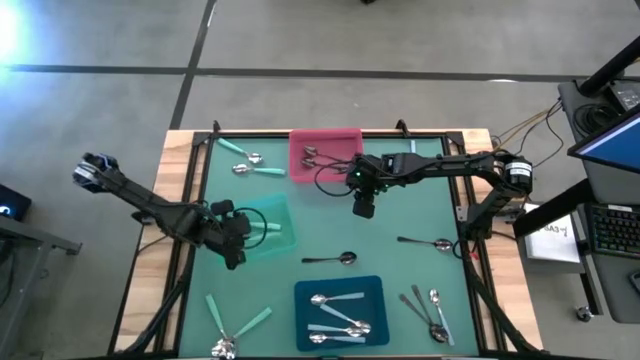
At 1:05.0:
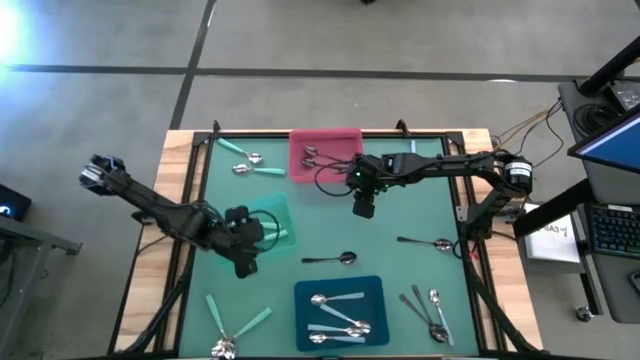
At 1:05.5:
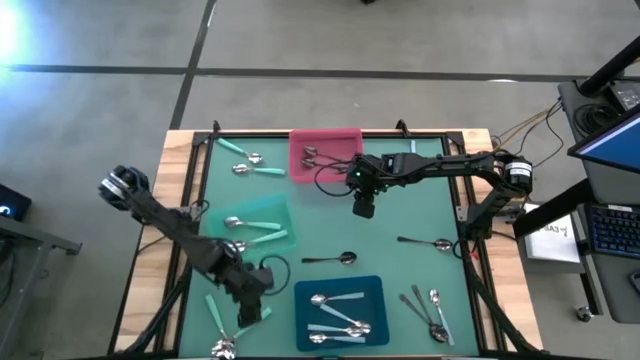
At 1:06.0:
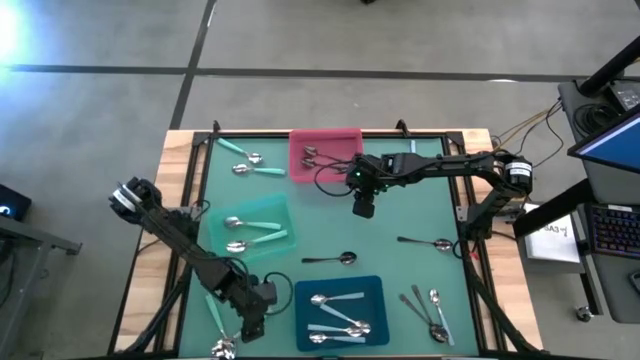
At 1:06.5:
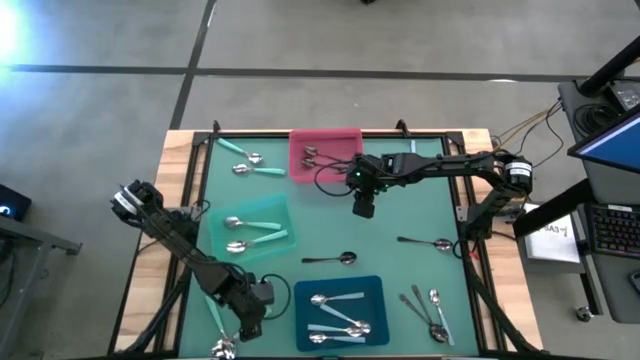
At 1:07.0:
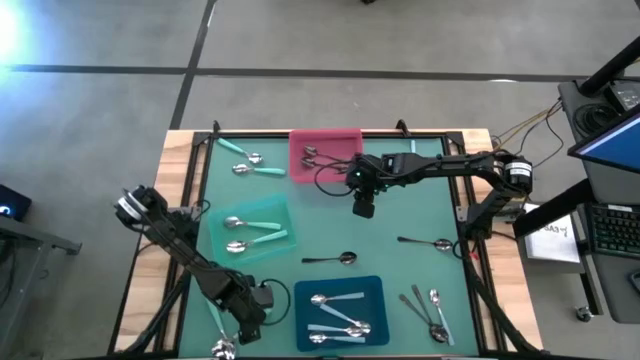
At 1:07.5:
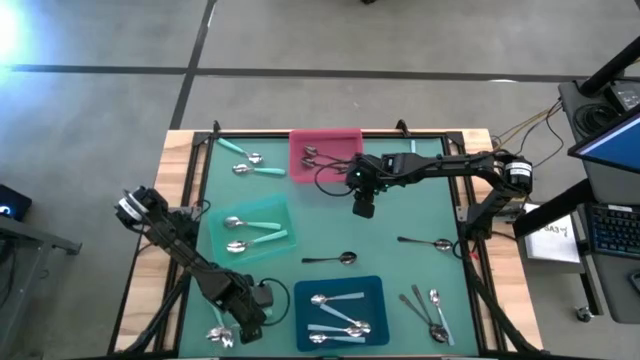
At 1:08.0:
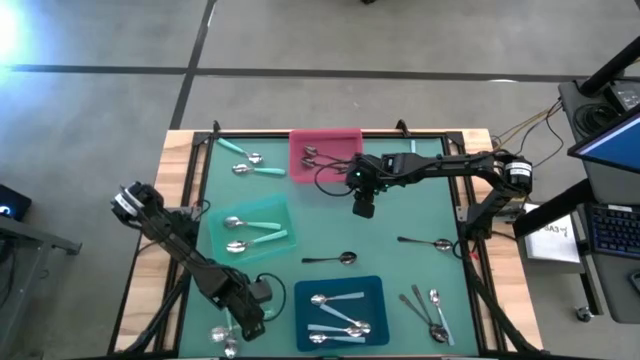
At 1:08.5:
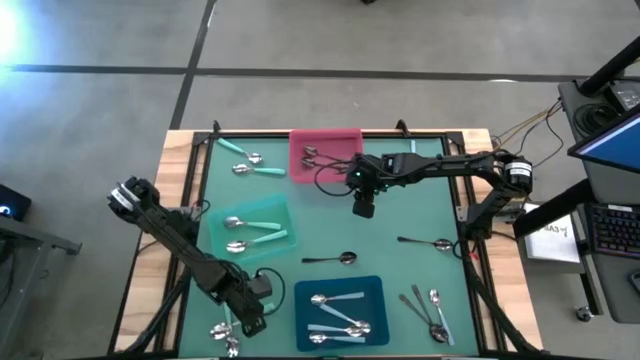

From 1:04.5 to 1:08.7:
Task: Sort silverware by color (type)
Put the green spoon into the green bin

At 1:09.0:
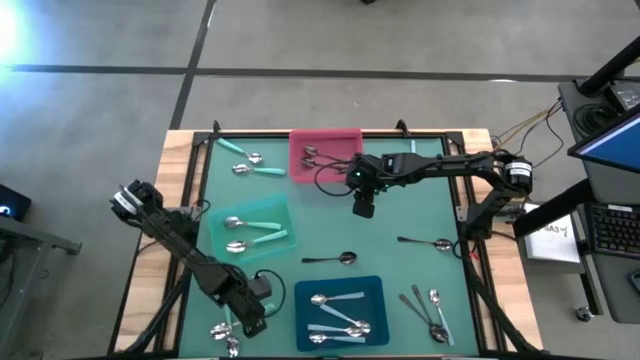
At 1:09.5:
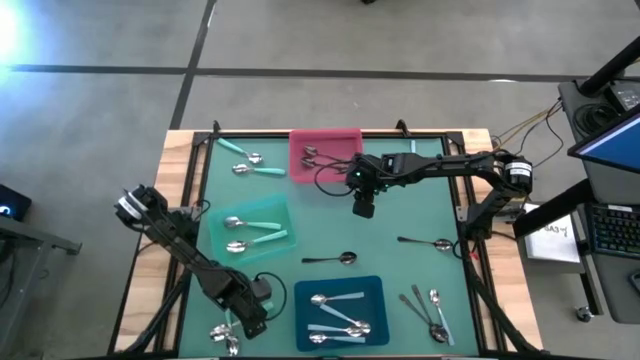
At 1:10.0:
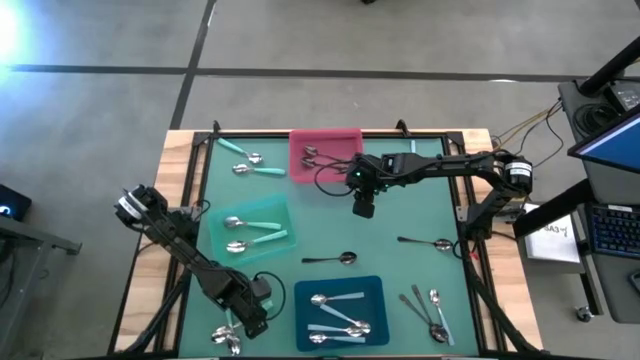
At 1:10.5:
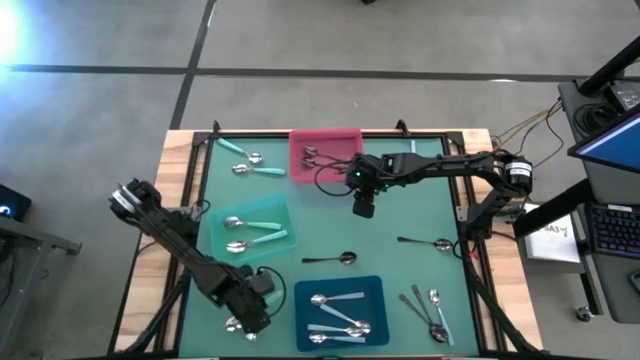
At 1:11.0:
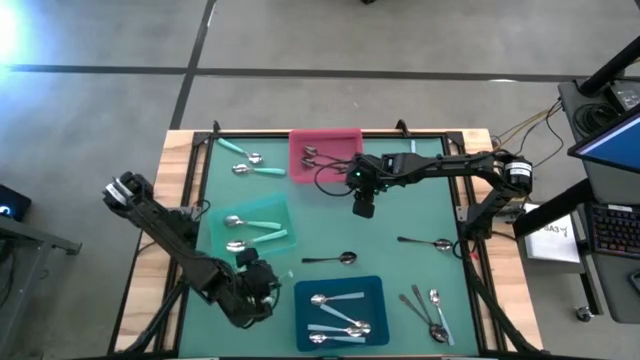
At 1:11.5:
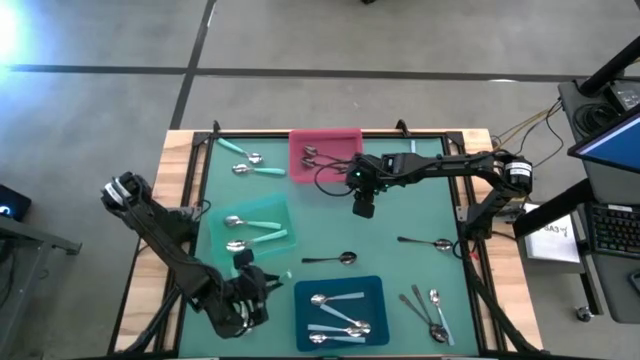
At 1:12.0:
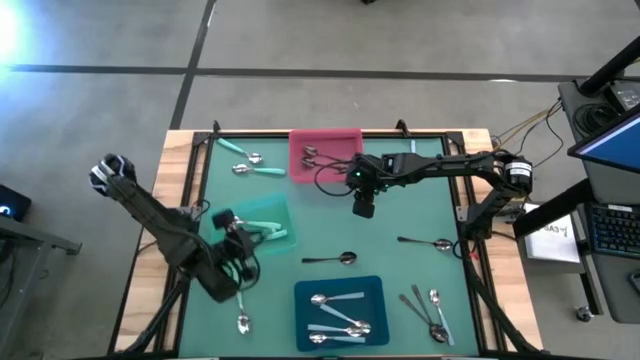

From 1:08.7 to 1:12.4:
Put the green spoon into the green bin

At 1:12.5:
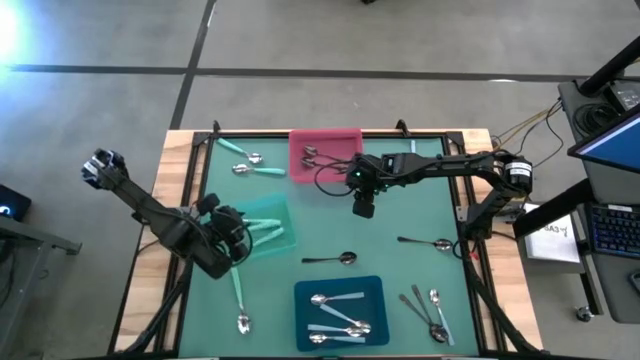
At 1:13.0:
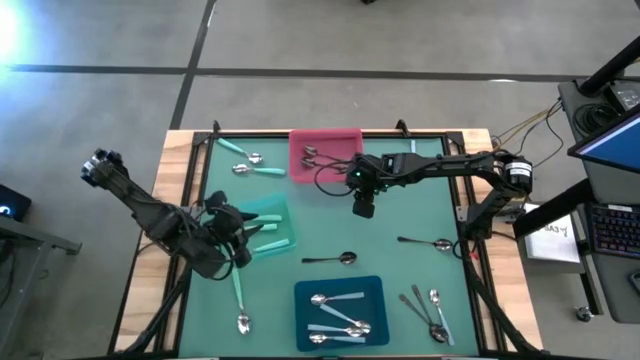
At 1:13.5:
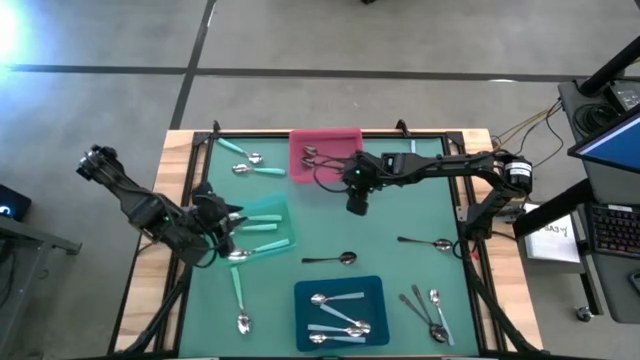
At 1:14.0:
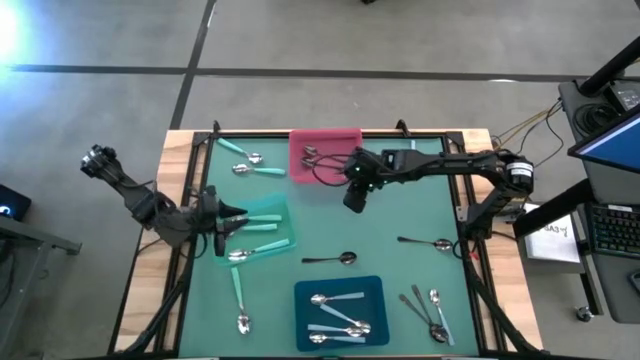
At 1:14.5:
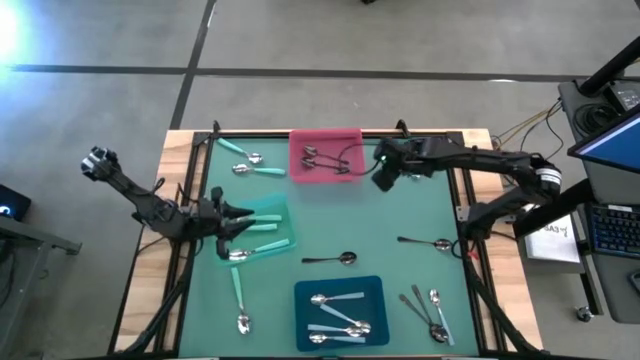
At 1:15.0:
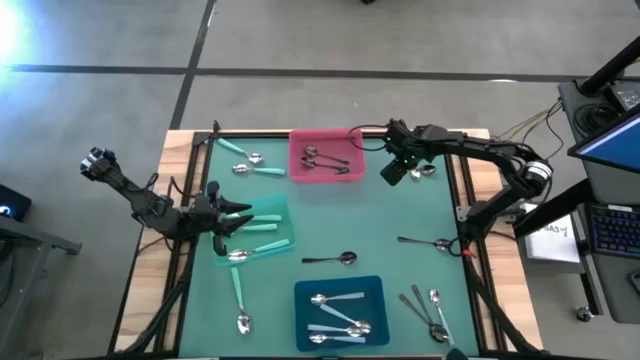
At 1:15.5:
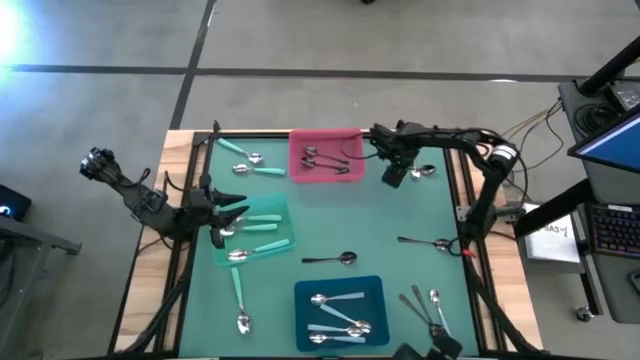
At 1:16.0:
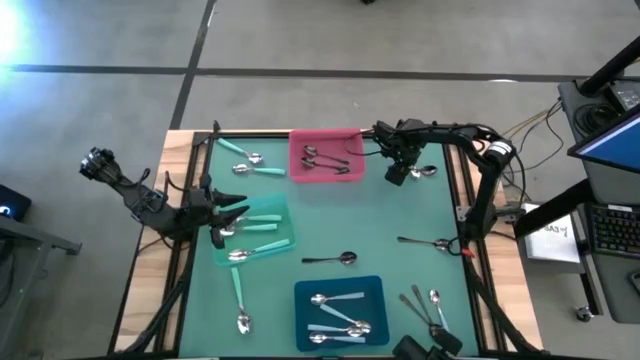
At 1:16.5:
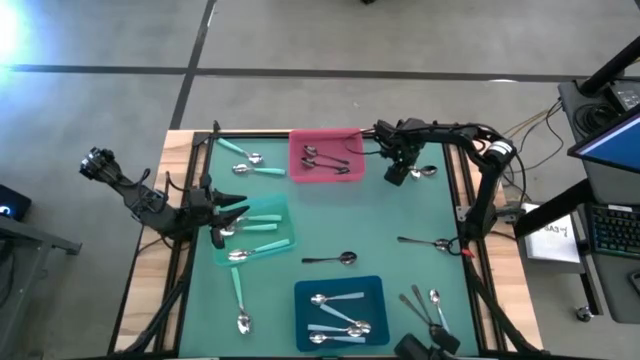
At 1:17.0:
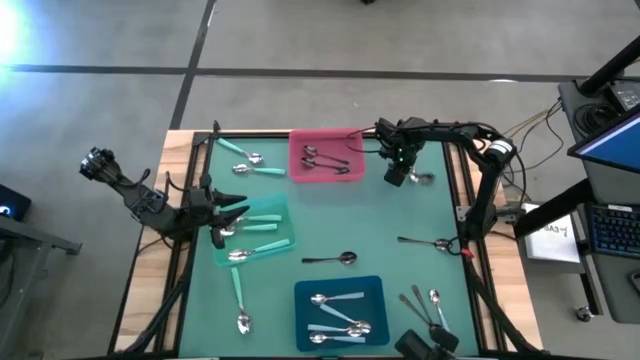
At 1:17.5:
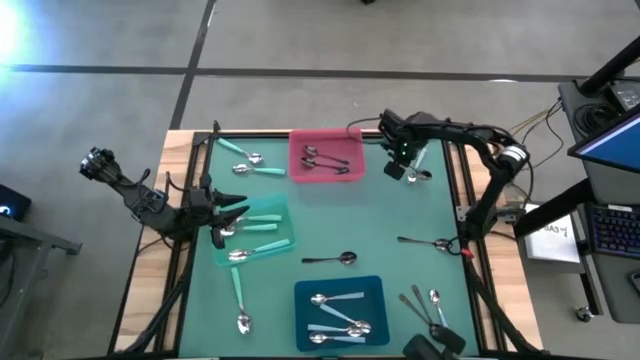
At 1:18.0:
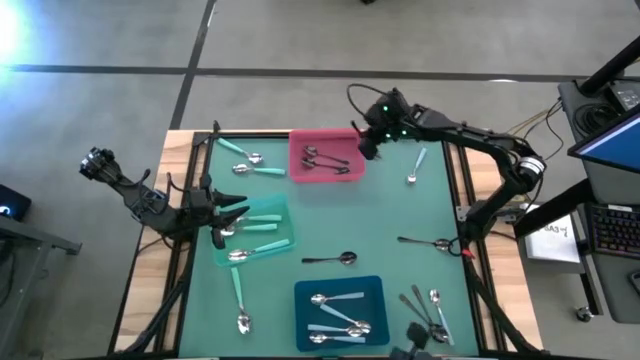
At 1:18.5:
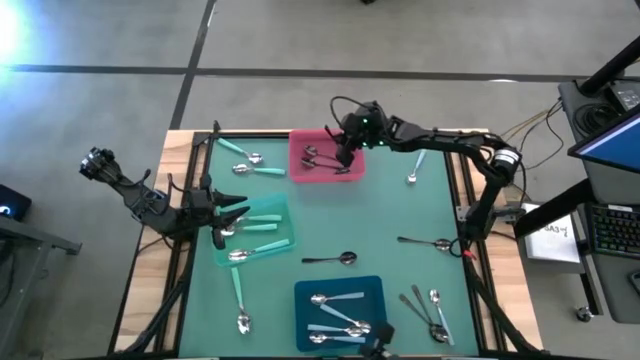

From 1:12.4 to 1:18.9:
Put the black spoon into the red bin

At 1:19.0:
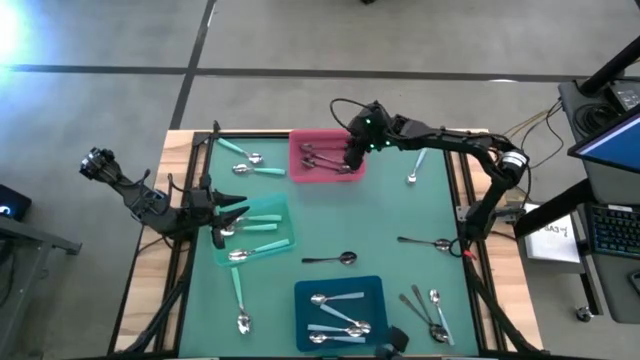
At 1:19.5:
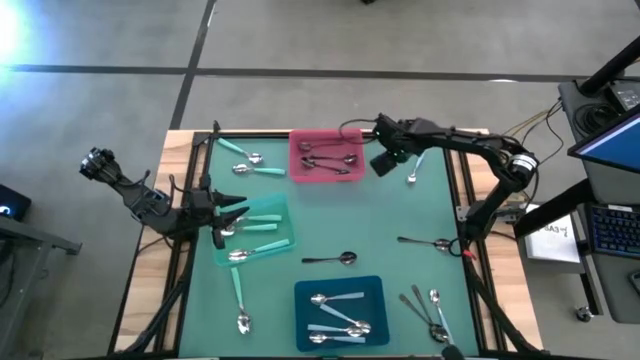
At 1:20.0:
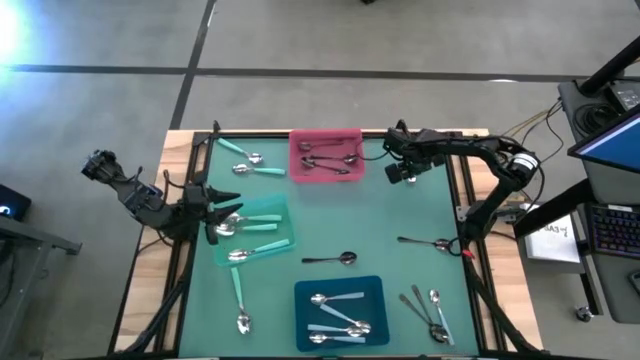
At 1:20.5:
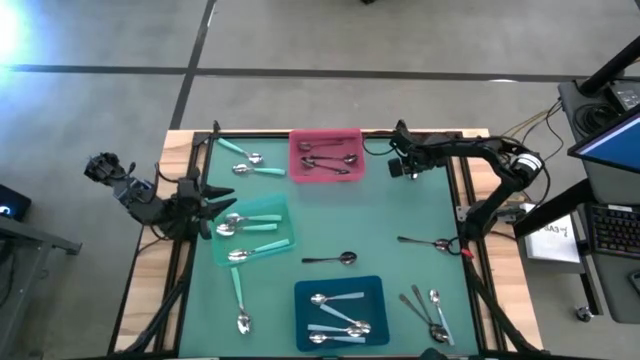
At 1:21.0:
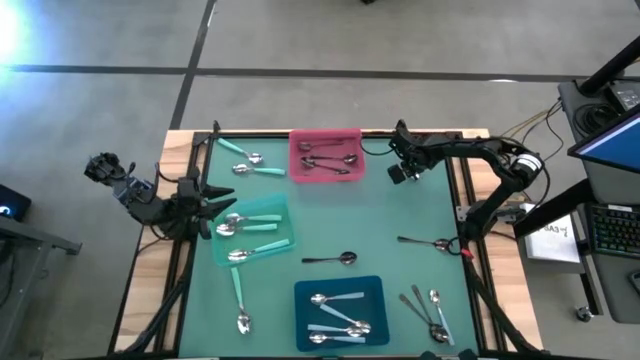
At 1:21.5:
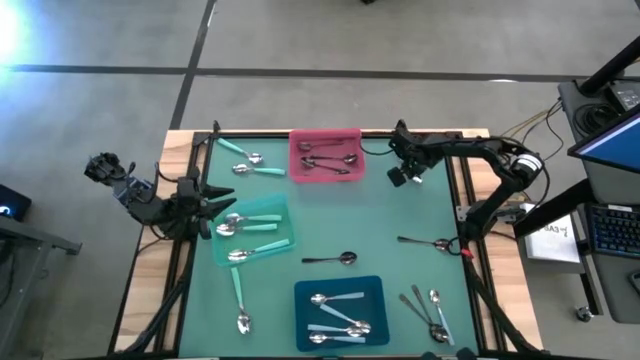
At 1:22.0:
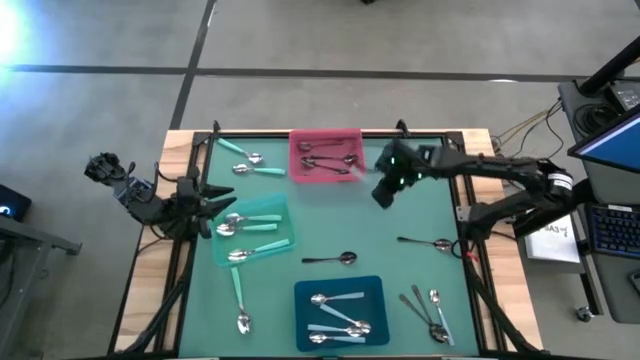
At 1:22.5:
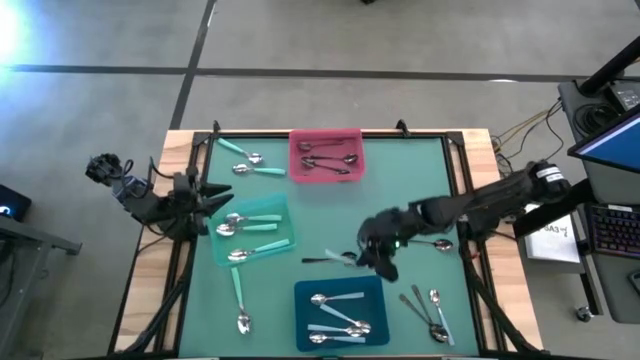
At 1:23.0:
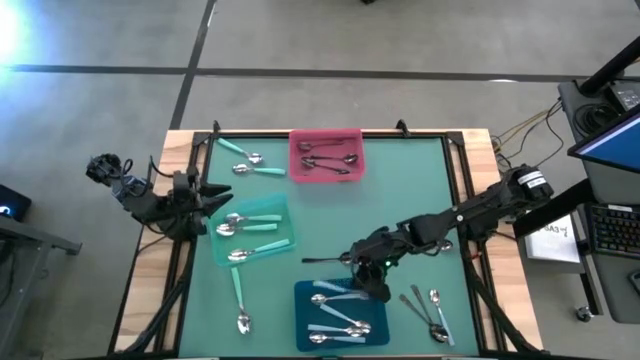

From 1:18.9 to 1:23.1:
Put the blue spoon into the blue bin

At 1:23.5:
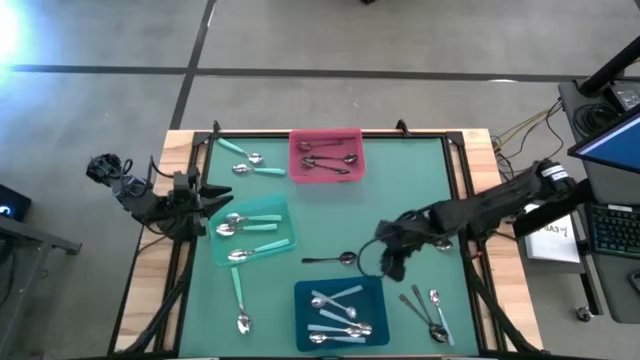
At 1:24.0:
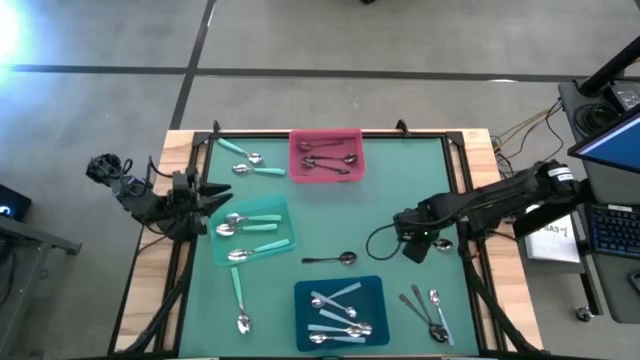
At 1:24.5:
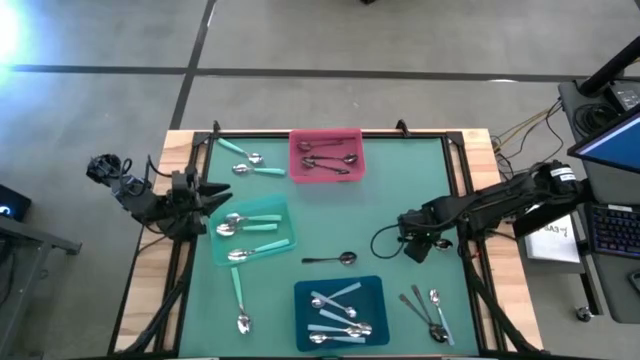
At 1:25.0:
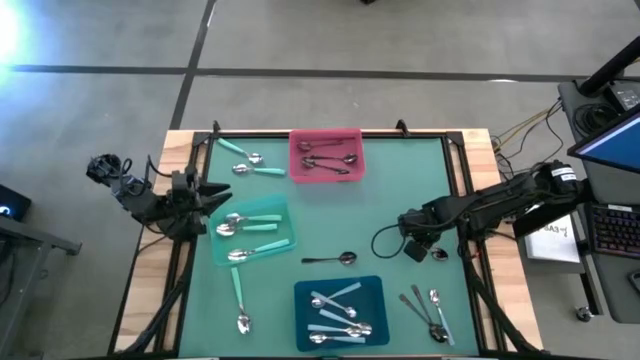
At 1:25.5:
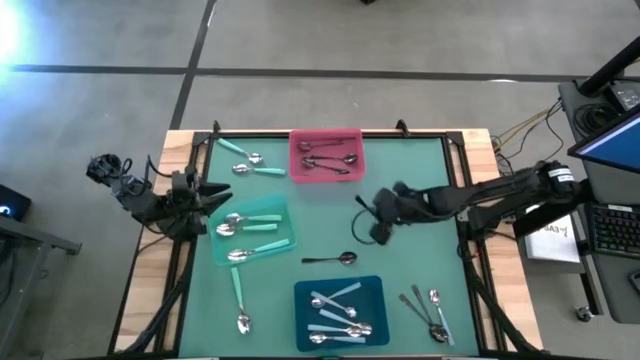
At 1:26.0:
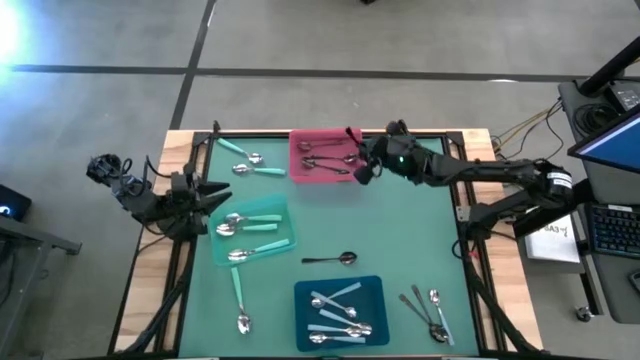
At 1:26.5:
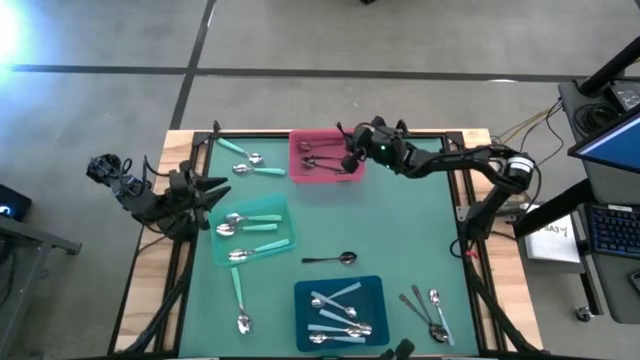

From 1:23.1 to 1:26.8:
Put the black spoon into the red bin
